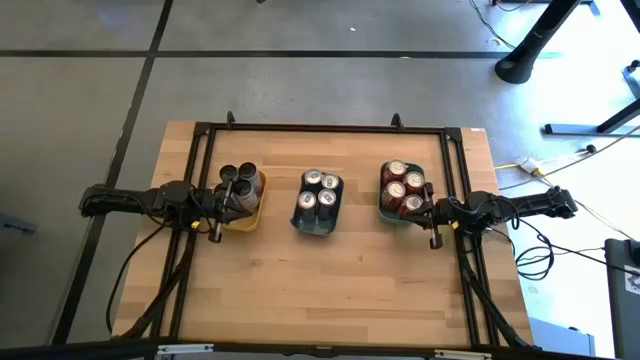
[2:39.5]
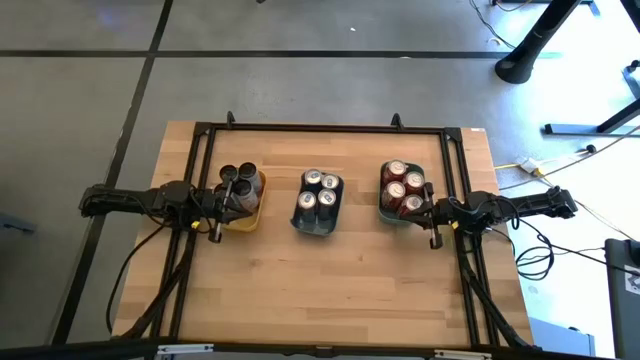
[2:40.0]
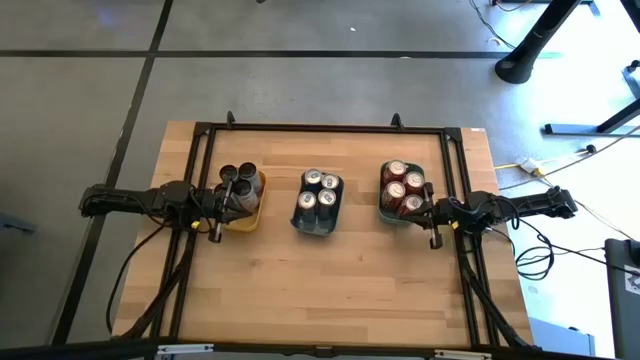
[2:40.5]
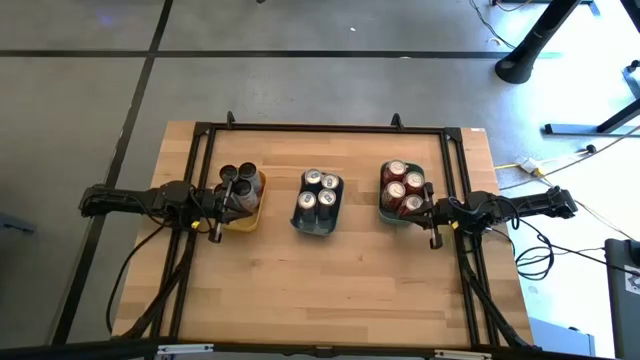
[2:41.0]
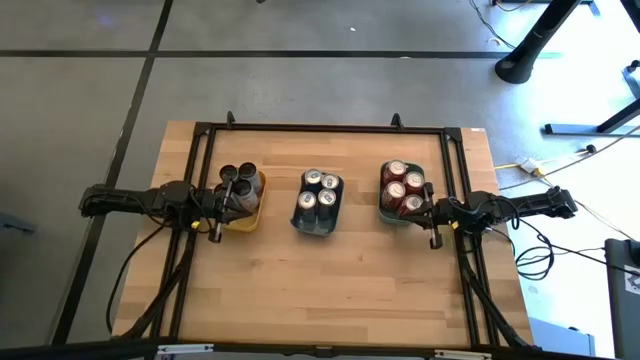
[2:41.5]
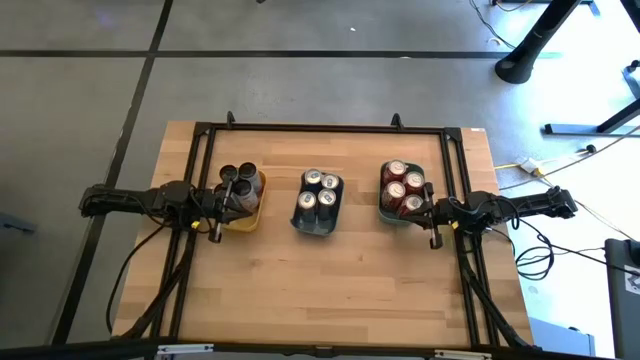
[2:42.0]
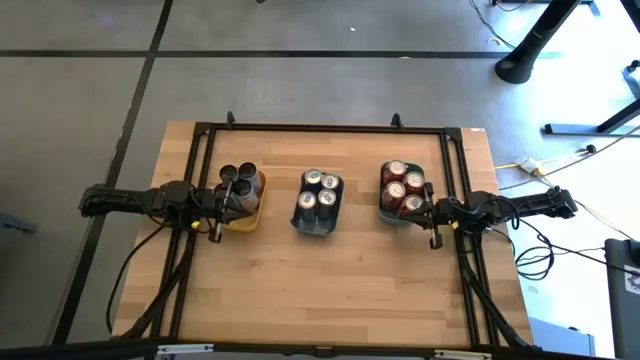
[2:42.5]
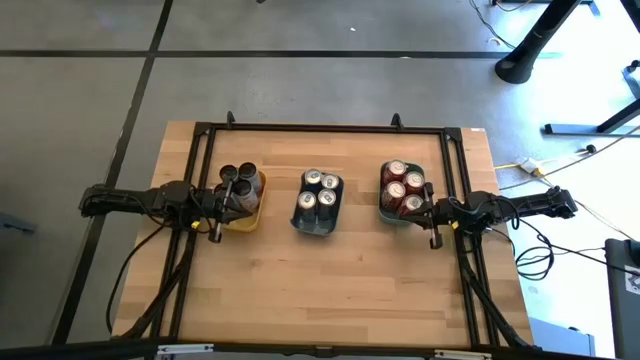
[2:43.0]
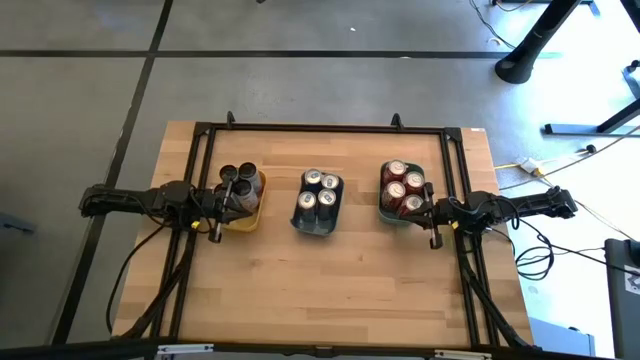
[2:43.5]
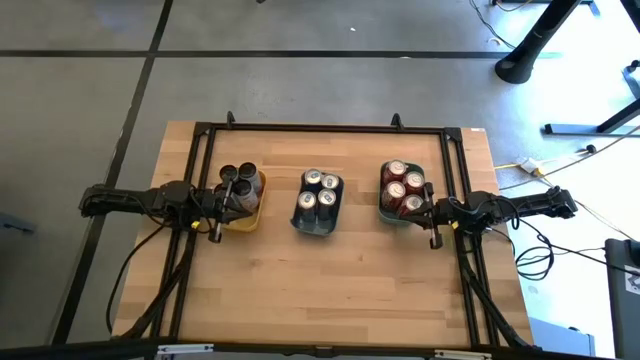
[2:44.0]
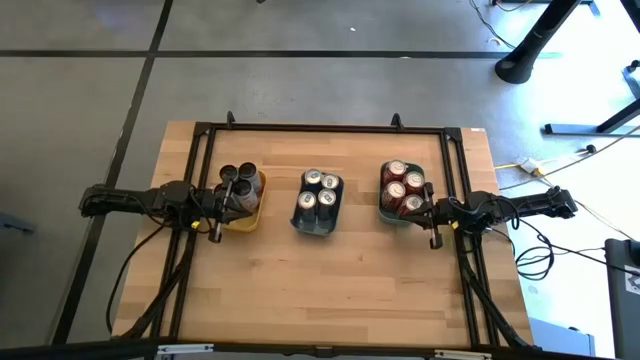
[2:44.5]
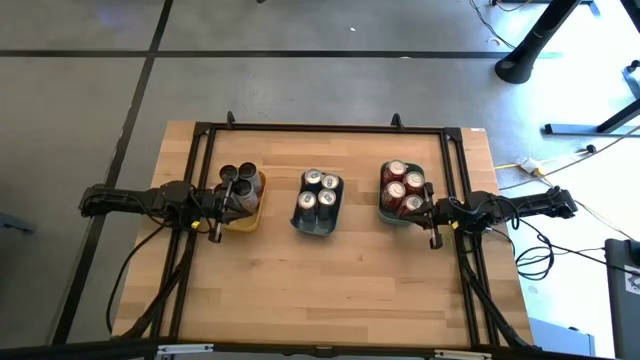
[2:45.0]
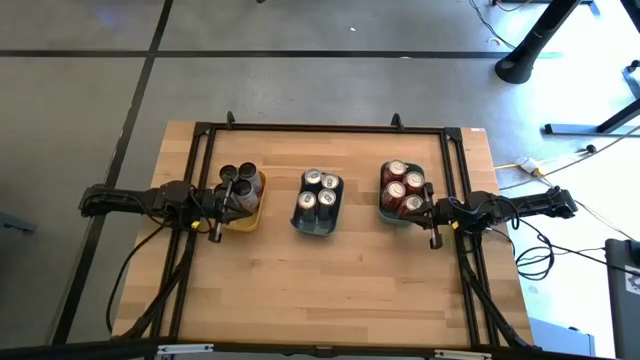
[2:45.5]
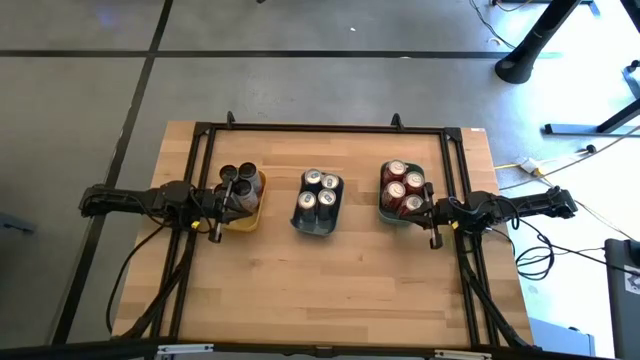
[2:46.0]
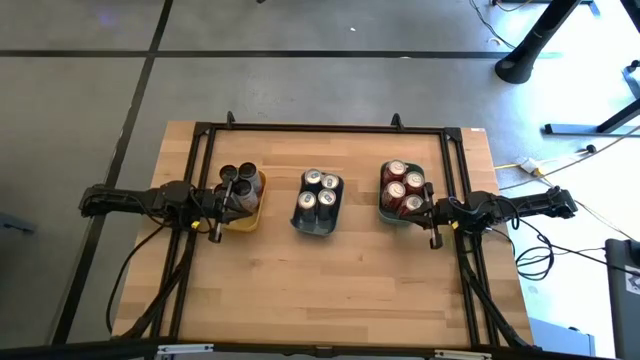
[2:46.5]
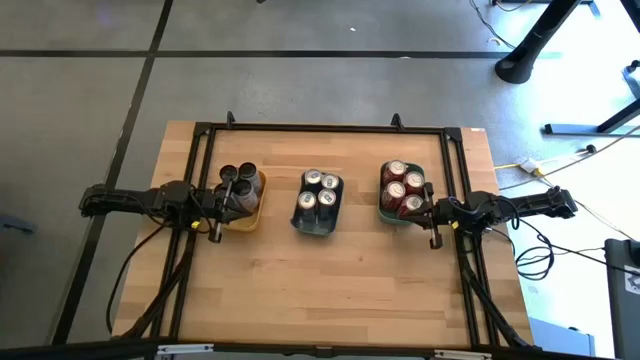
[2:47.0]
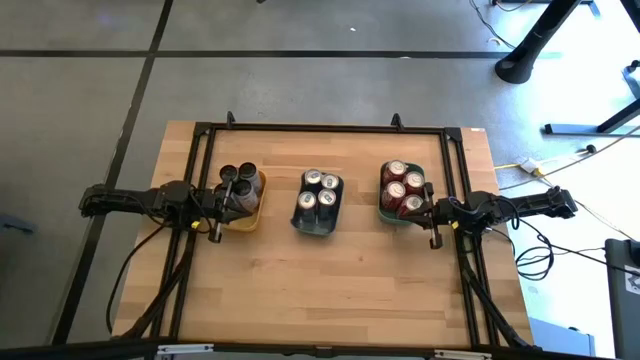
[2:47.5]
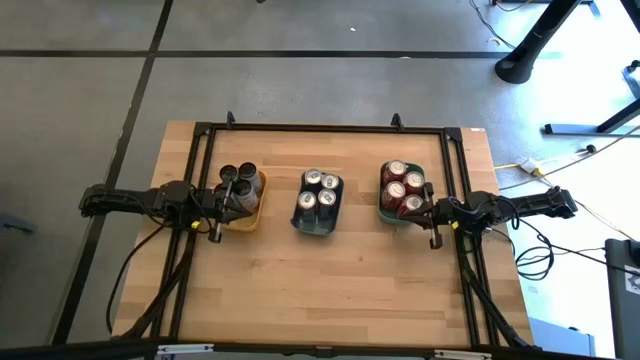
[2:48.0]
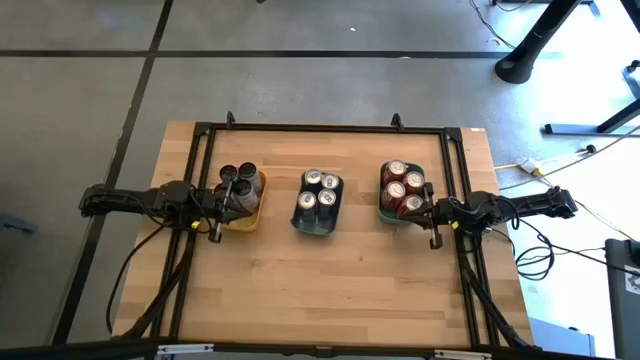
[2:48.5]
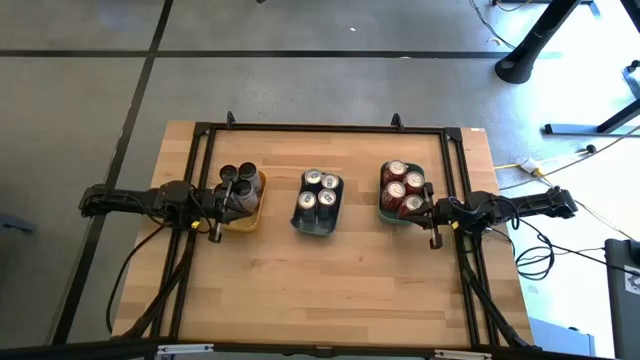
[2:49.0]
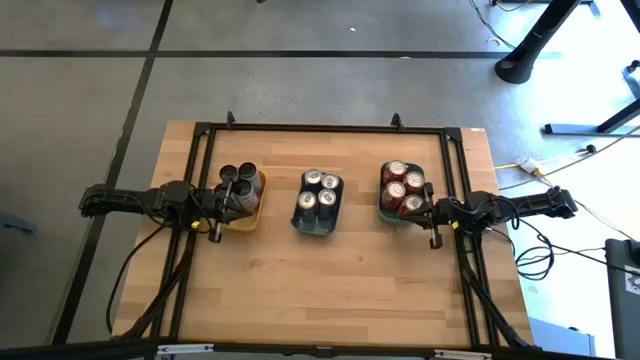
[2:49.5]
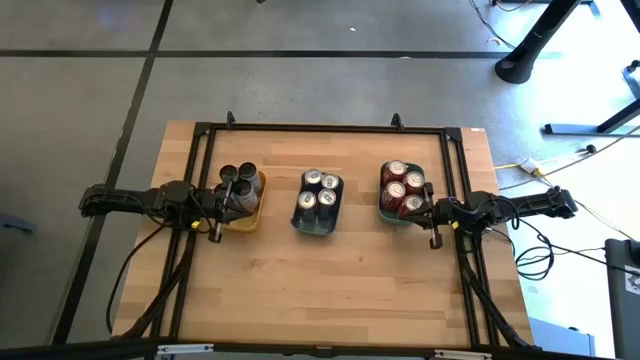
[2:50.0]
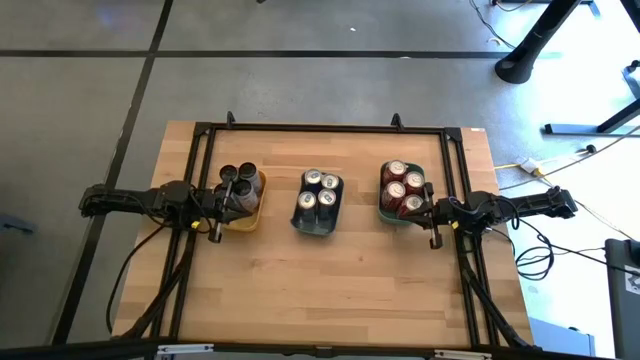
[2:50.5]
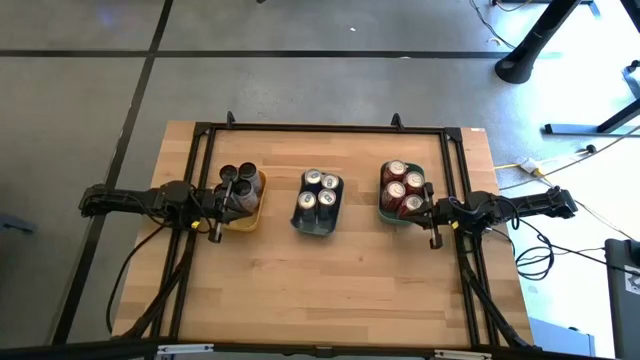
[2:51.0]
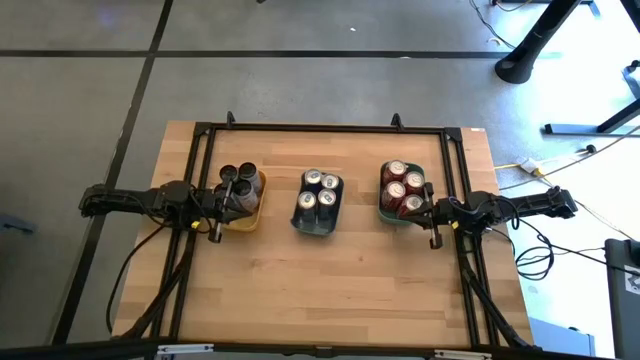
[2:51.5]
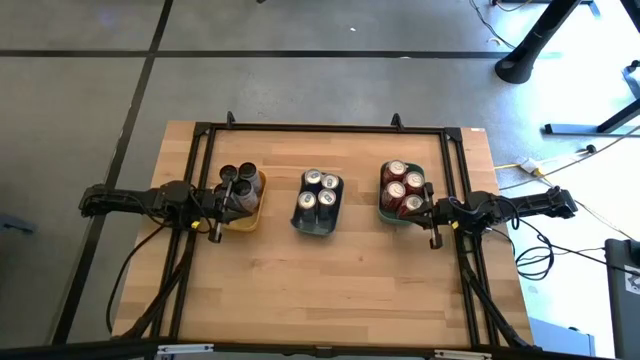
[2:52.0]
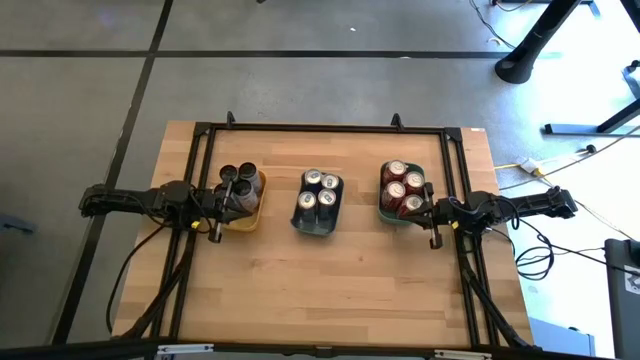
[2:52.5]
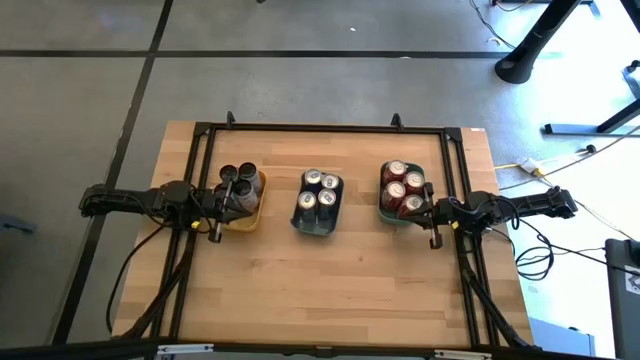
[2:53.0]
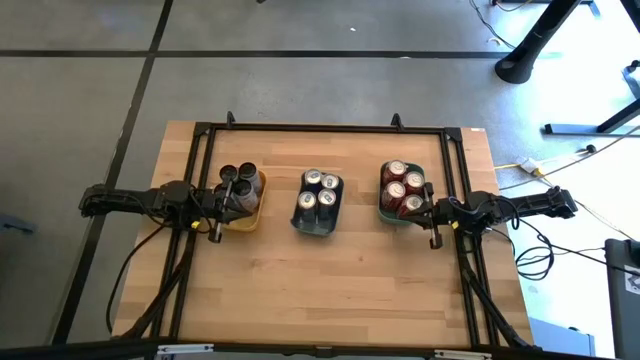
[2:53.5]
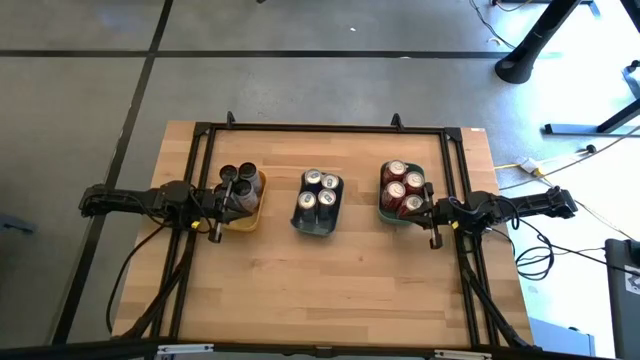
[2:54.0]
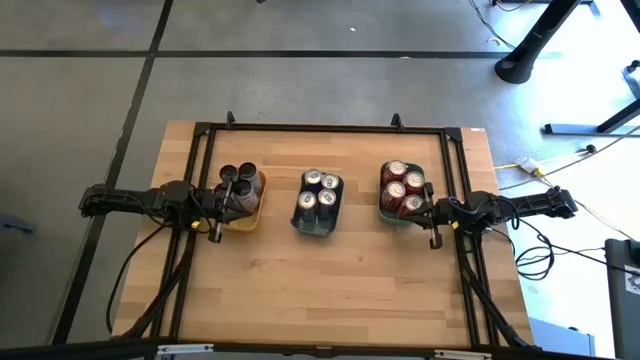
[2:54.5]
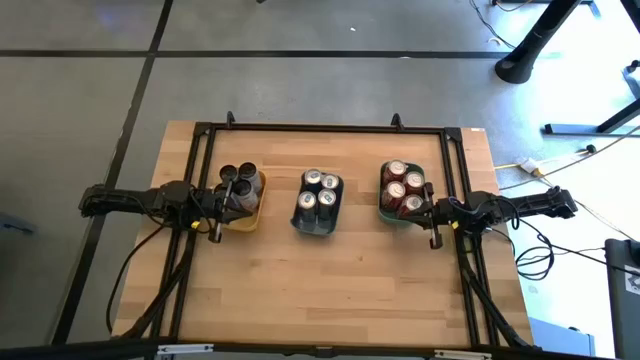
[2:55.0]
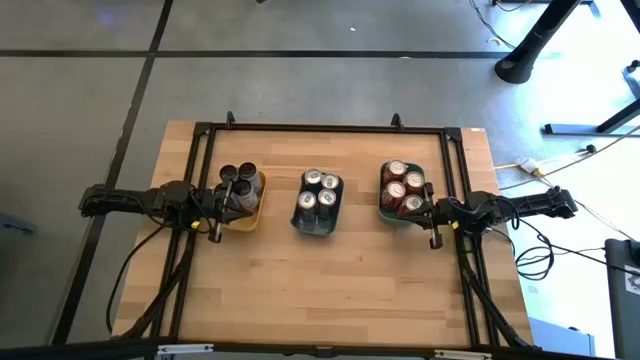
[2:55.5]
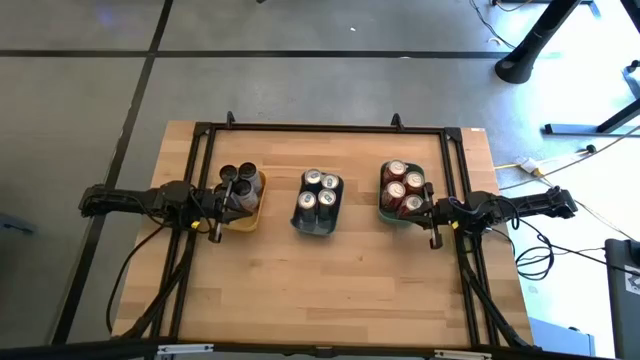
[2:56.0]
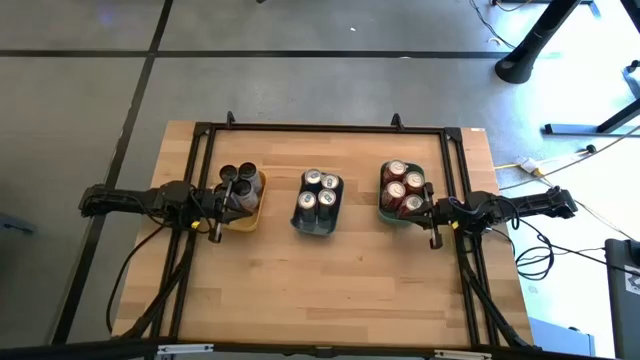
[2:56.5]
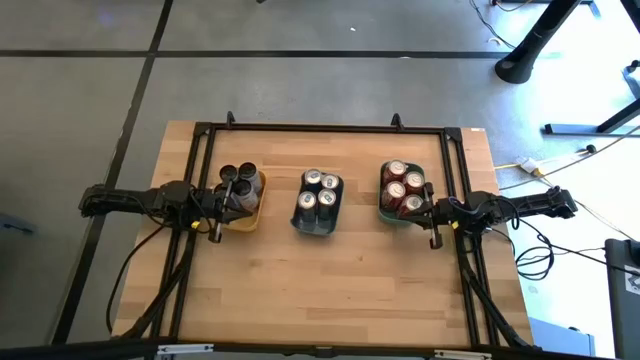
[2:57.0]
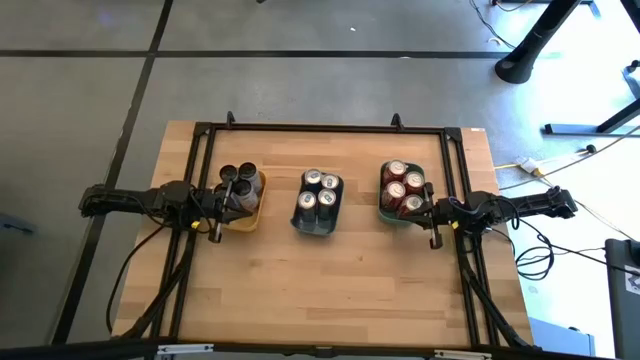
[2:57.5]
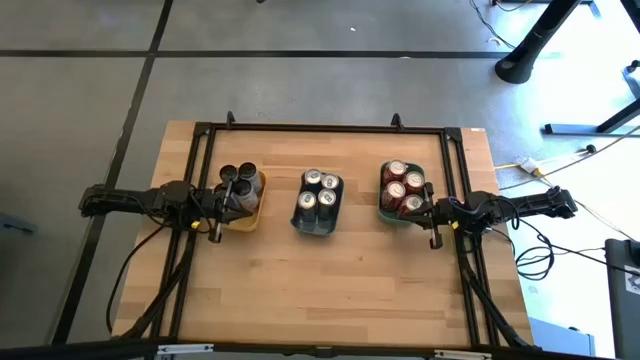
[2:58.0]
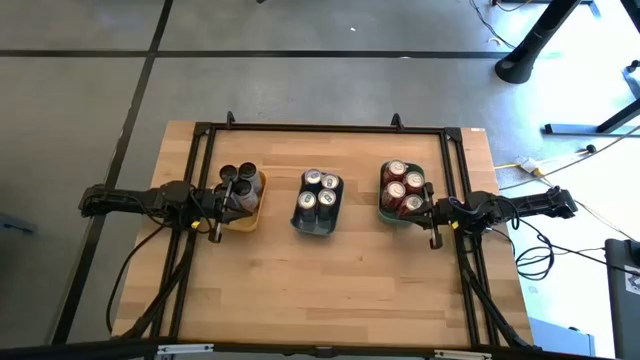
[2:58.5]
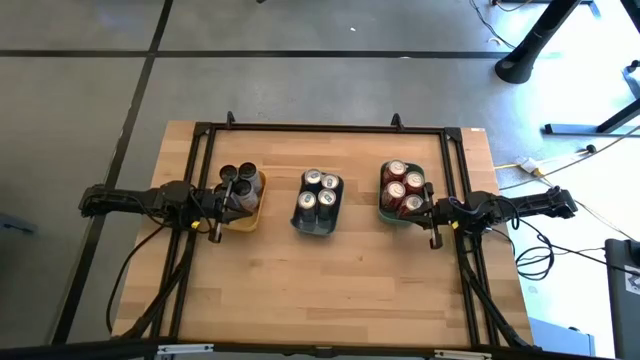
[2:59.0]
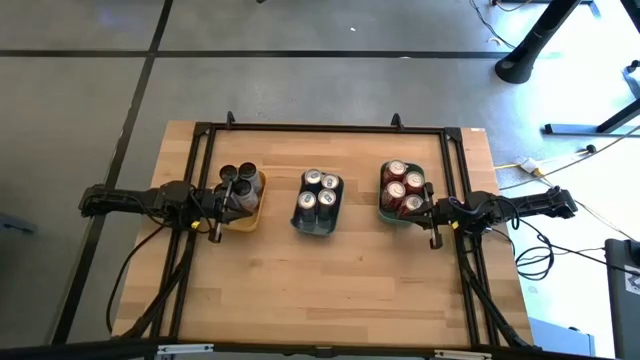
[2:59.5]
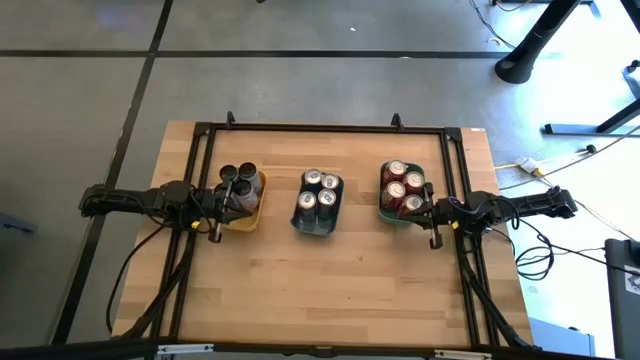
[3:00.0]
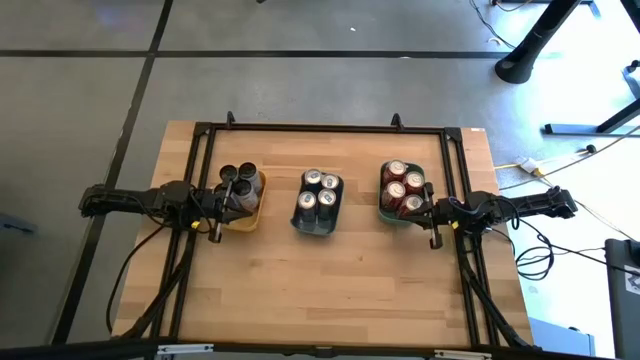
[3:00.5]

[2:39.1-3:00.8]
Task: Sort soda cans
Return to Home Position
